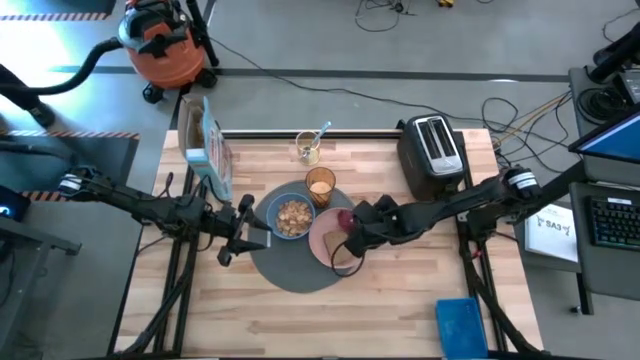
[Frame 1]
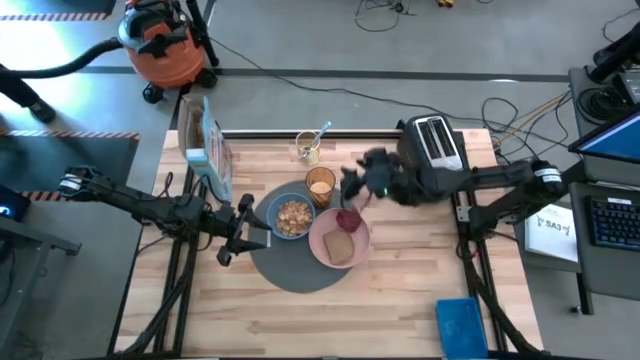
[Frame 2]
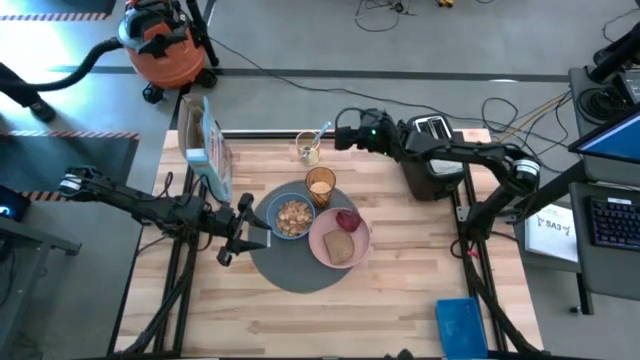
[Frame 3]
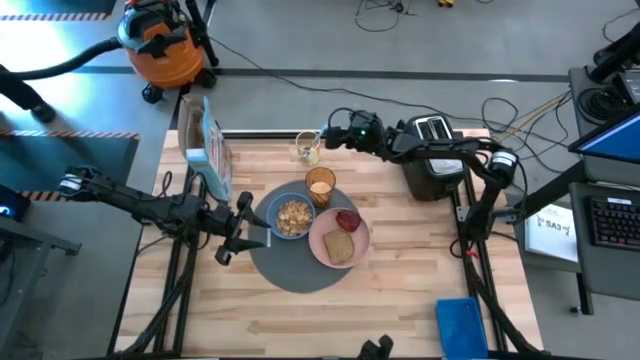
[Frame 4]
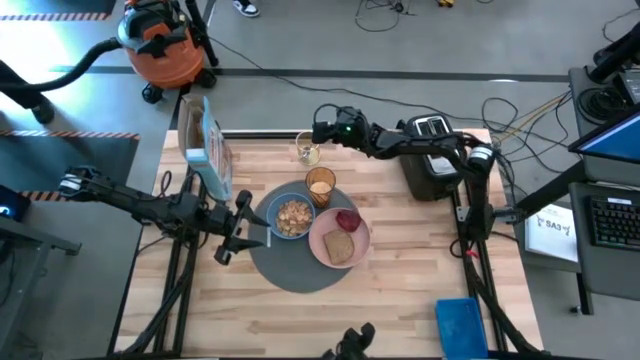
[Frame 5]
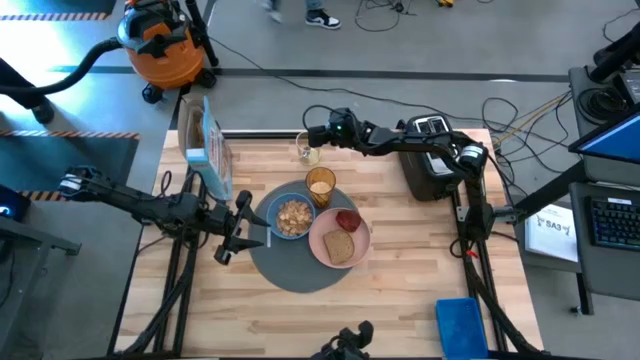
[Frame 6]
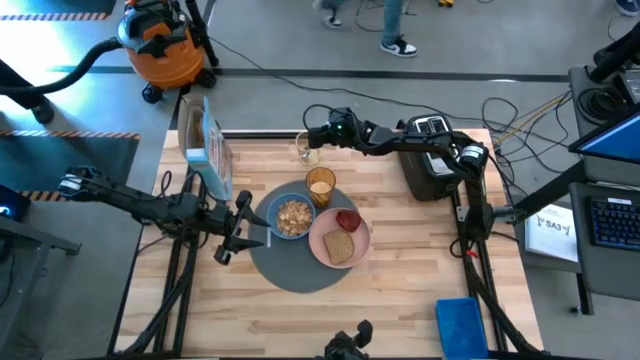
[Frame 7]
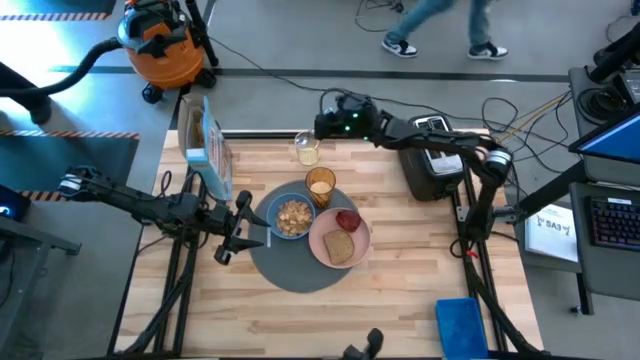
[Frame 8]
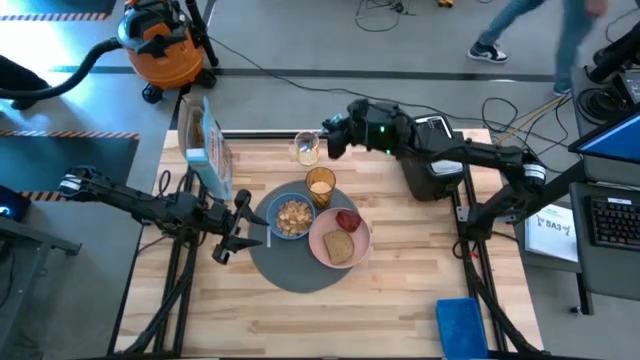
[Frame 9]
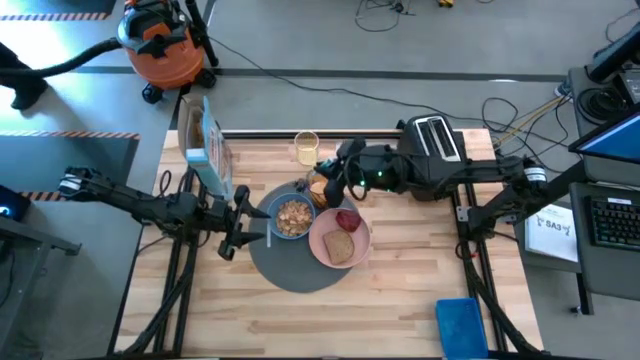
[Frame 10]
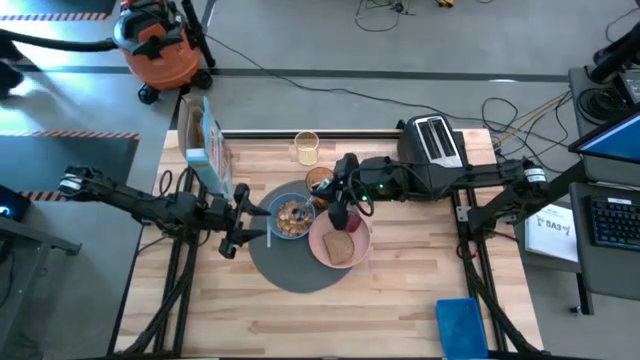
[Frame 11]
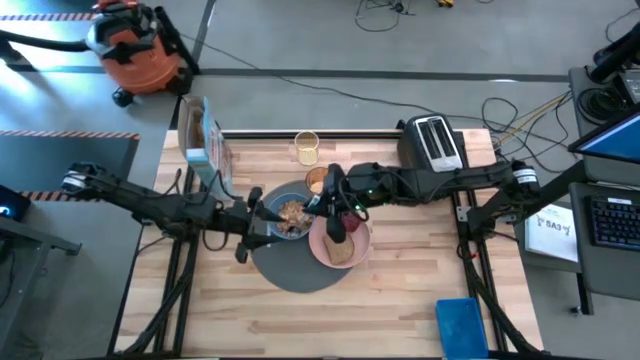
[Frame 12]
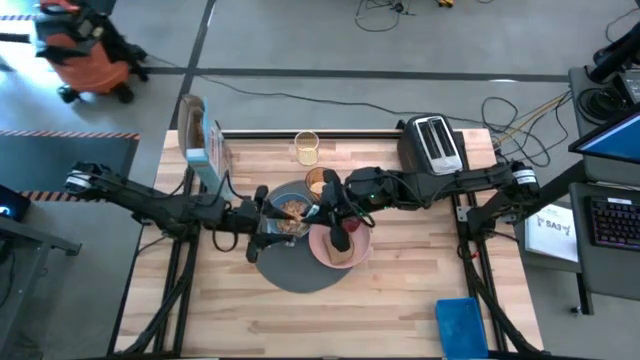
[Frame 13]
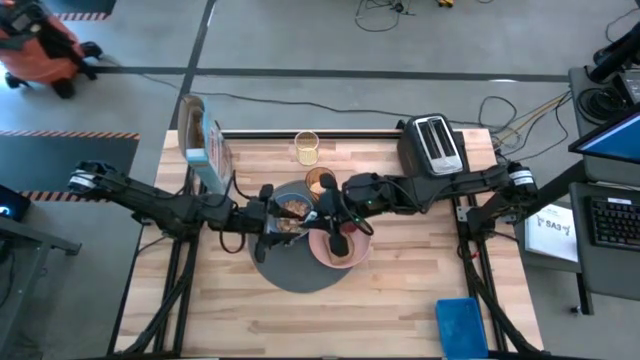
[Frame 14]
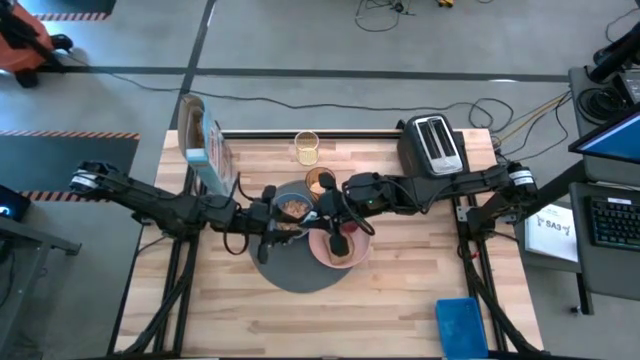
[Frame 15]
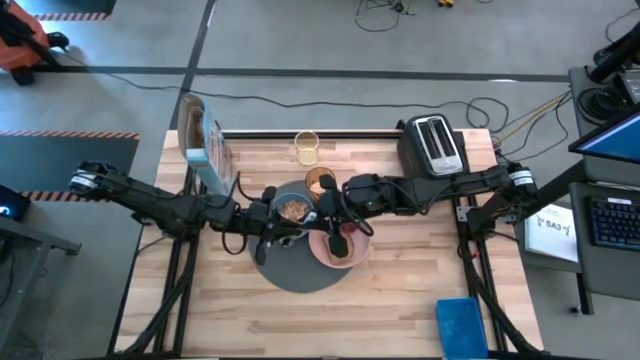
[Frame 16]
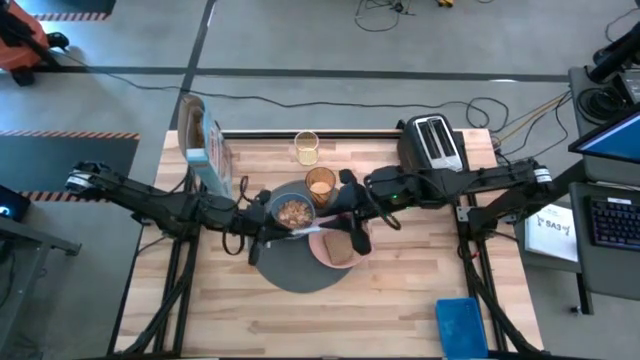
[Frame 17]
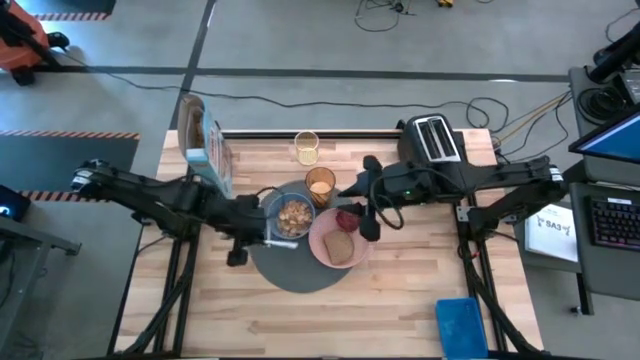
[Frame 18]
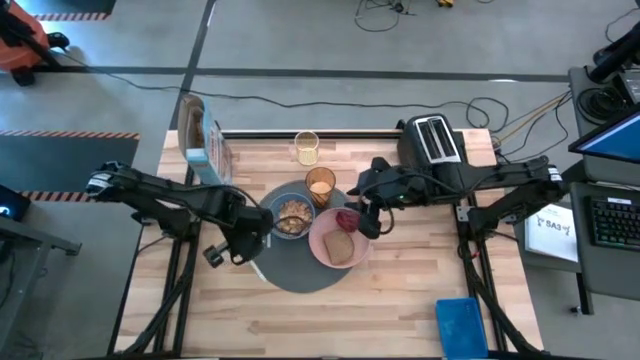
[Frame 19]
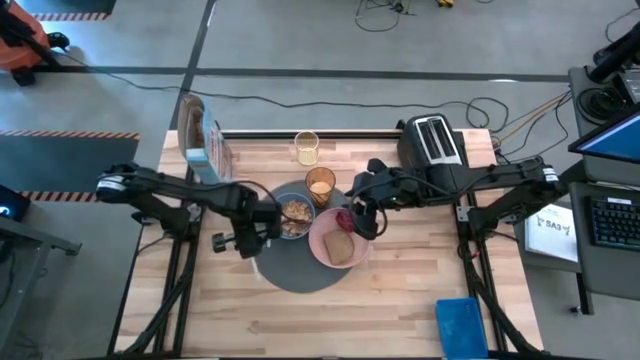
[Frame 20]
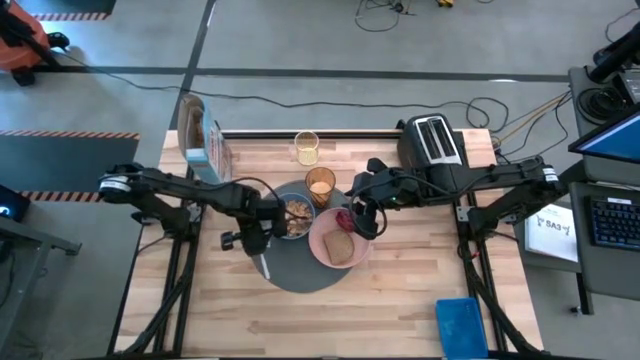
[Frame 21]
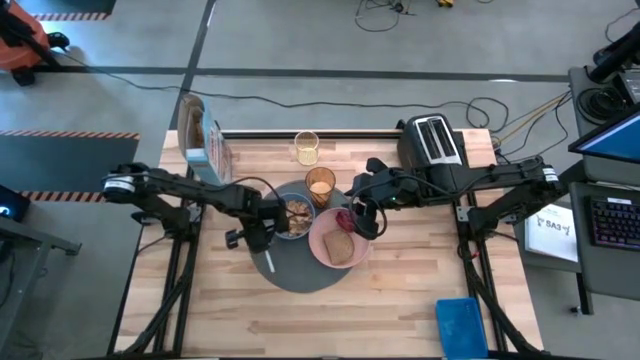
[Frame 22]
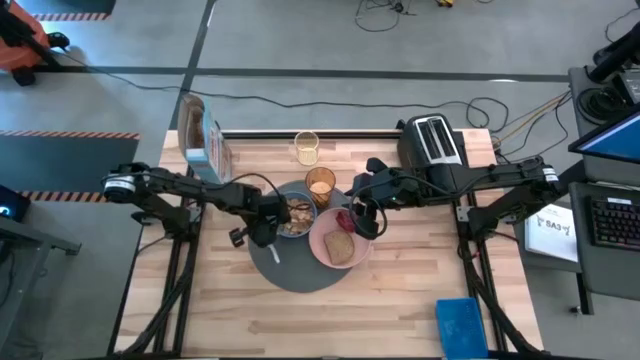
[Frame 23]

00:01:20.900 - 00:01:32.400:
Task: Arrange a breakfast setting
Put the blue spoon on the gray table mat to the bottom left of the blue bowl

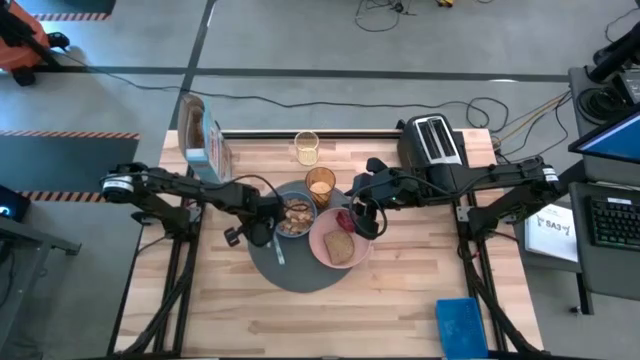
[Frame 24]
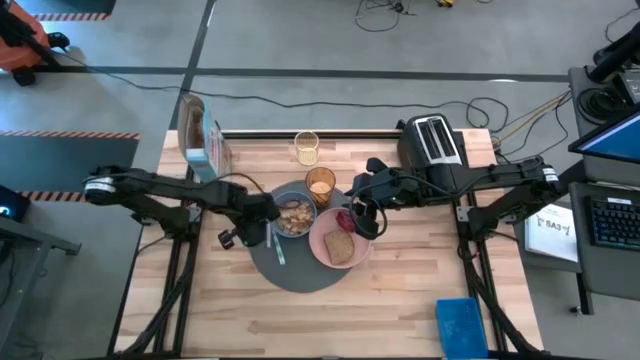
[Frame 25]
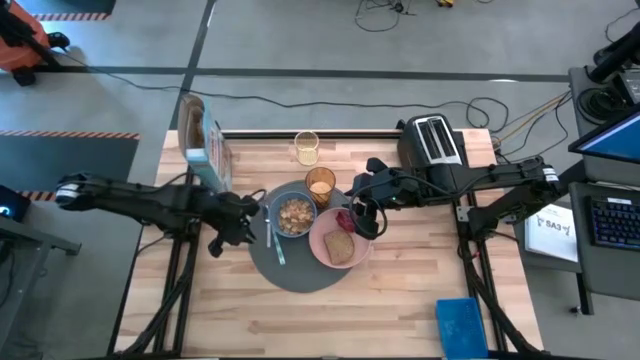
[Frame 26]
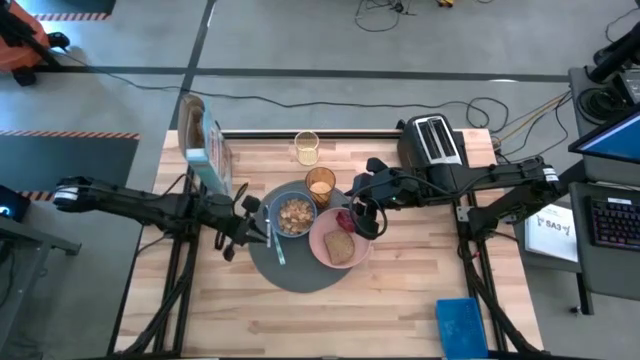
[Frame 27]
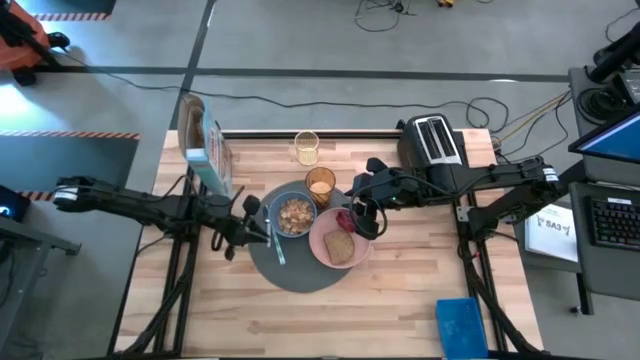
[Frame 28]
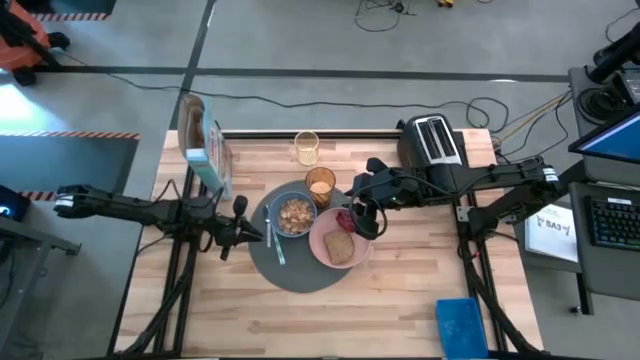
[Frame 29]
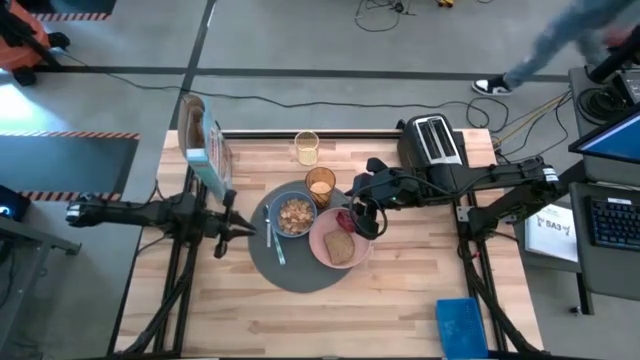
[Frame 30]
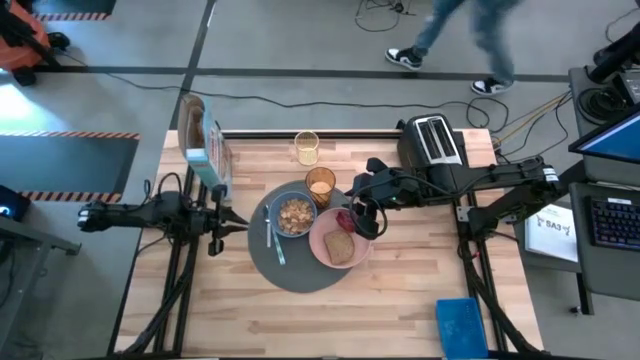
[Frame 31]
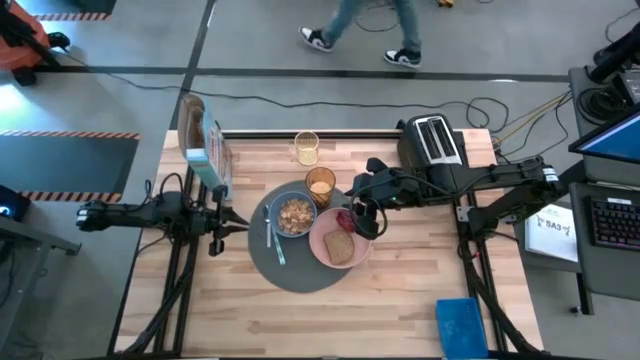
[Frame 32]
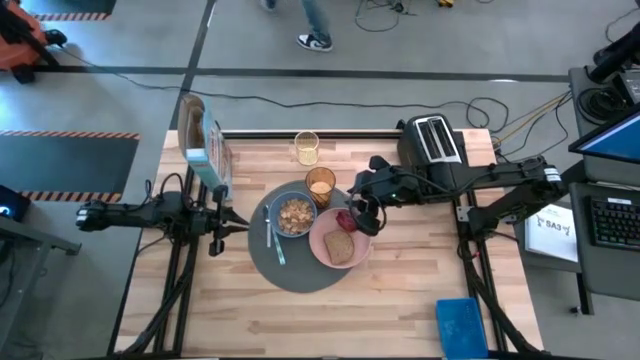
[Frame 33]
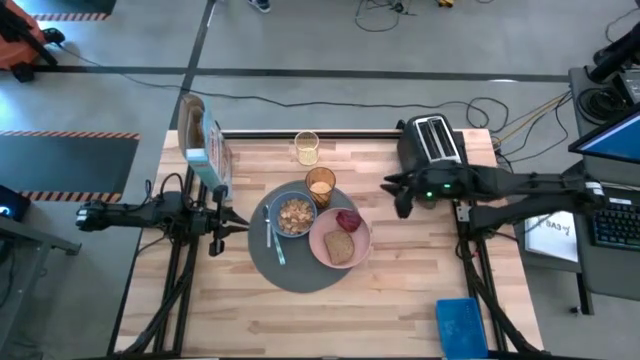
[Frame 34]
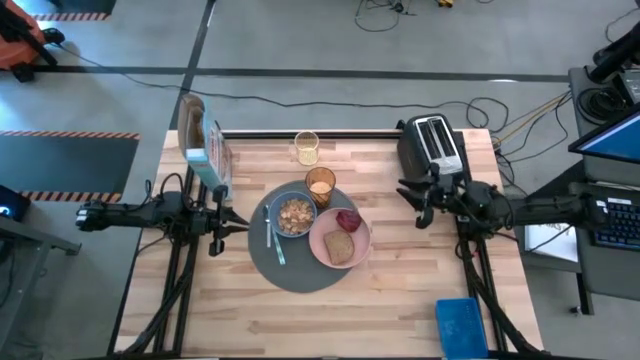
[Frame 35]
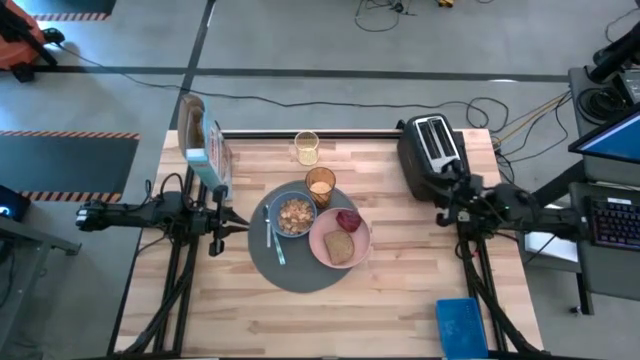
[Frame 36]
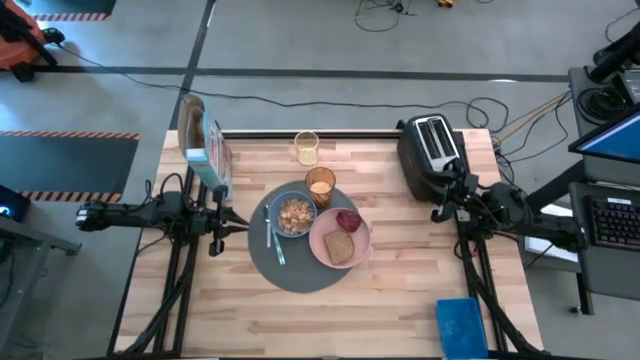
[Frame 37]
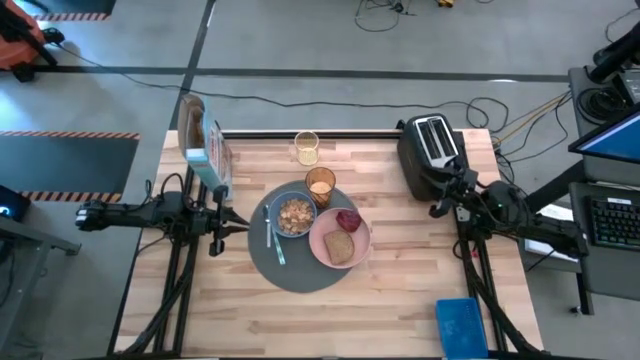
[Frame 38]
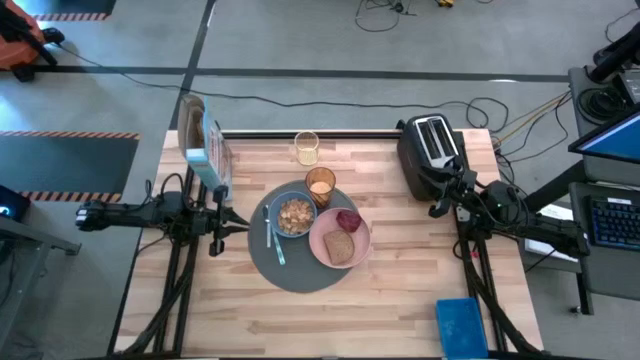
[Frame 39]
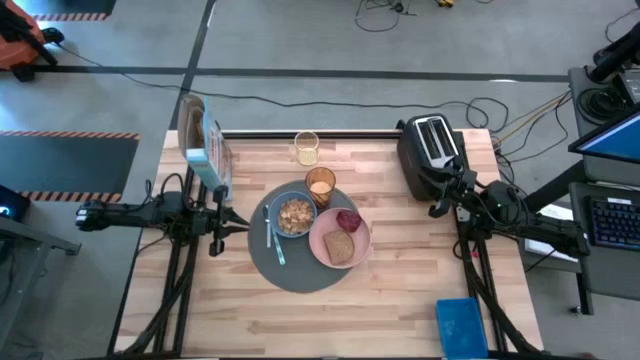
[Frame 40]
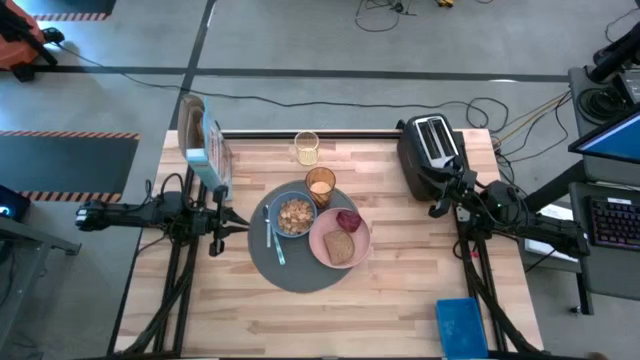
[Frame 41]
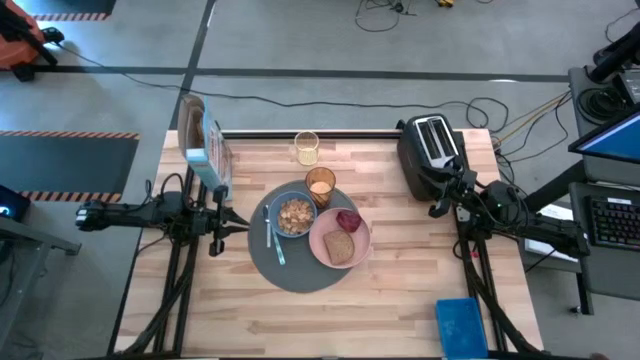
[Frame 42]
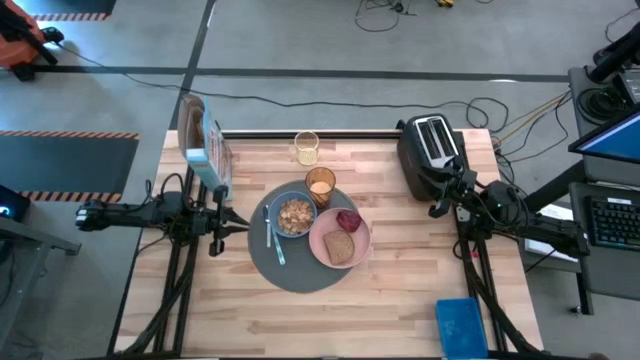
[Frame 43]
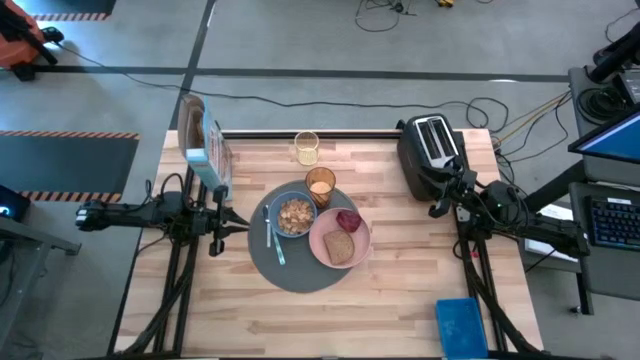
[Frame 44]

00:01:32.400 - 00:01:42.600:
Return to Home Position

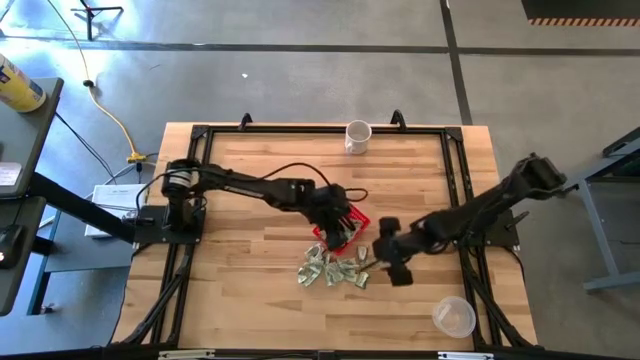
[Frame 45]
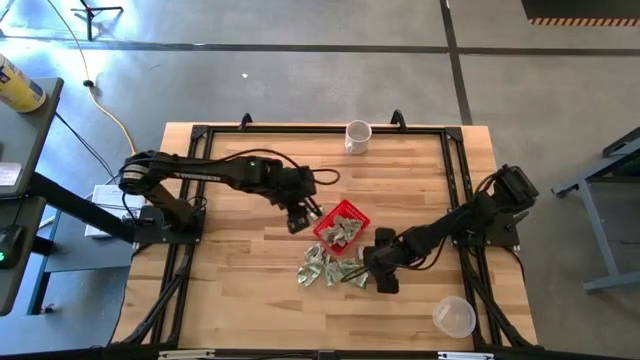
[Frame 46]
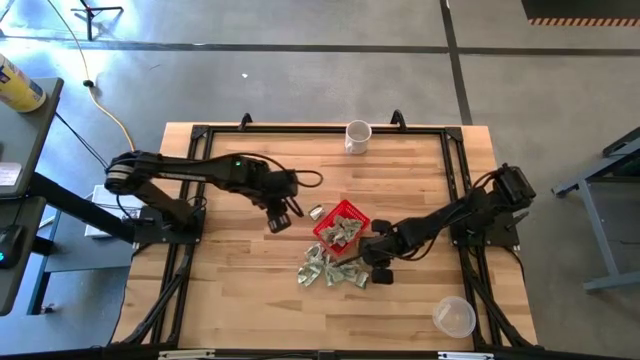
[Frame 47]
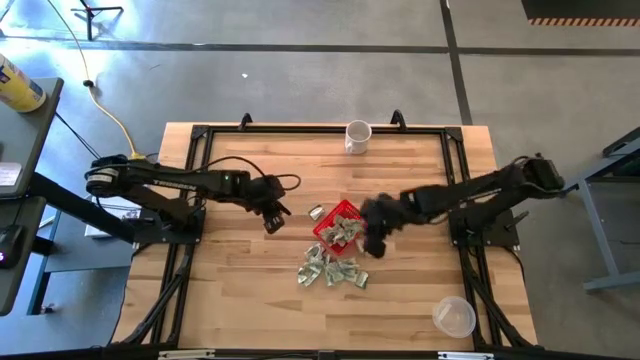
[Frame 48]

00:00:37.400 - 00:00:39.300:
Task: Pick and place items into bin
Put the white stevia packet into the red bin
